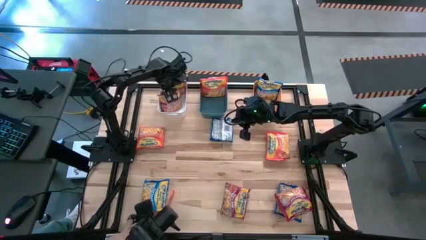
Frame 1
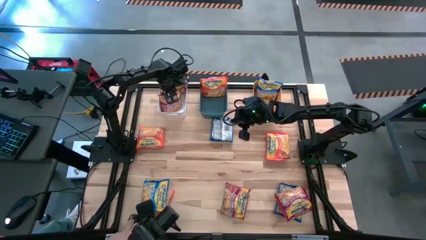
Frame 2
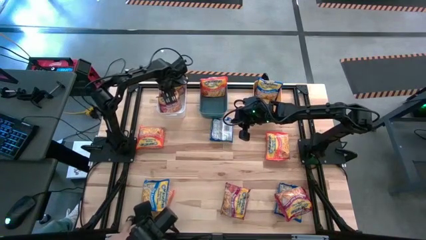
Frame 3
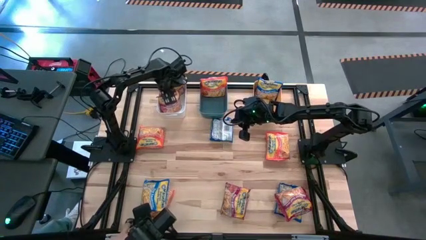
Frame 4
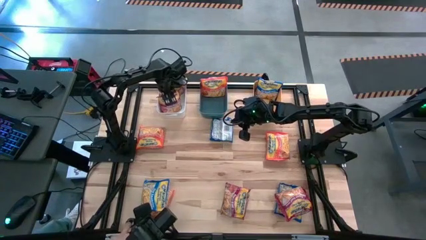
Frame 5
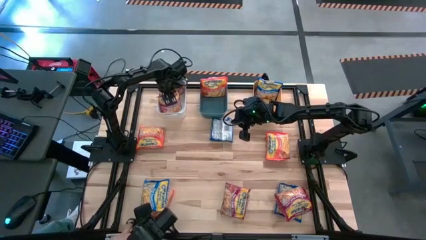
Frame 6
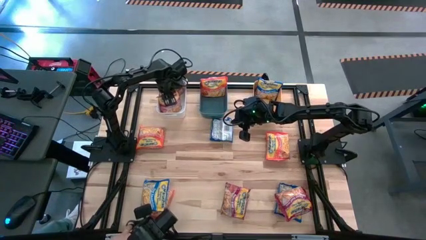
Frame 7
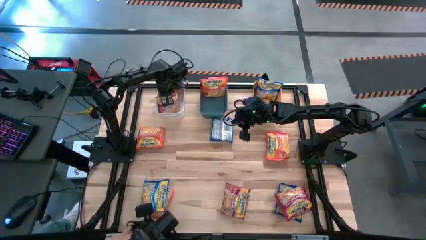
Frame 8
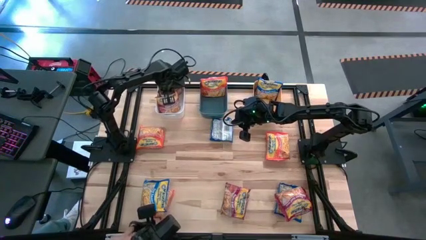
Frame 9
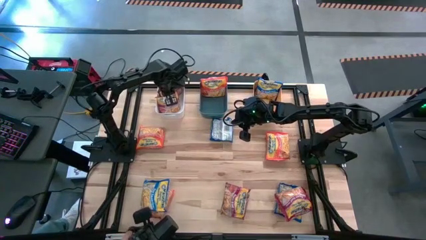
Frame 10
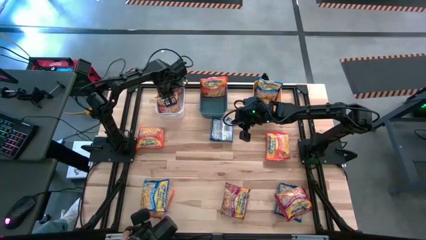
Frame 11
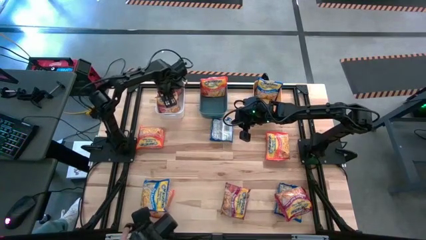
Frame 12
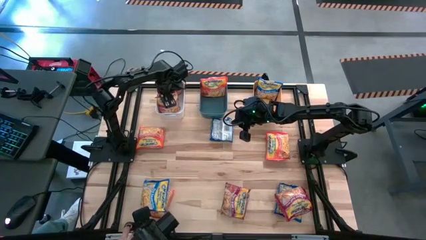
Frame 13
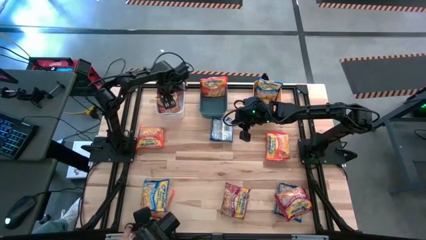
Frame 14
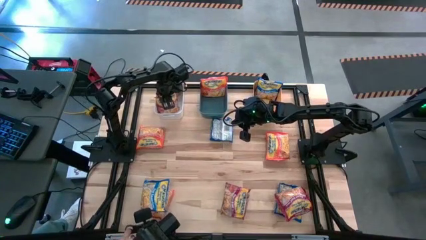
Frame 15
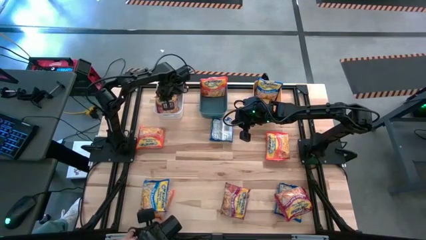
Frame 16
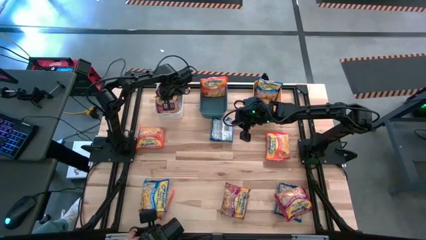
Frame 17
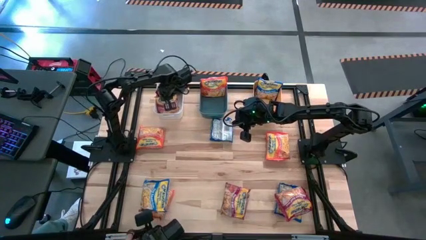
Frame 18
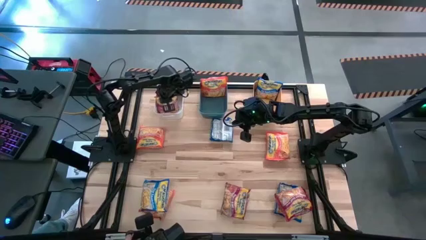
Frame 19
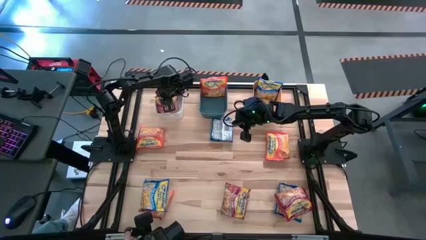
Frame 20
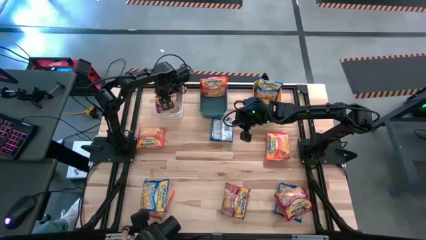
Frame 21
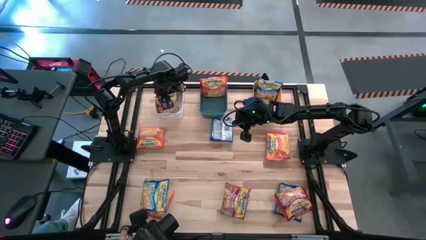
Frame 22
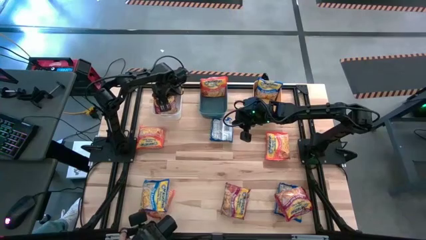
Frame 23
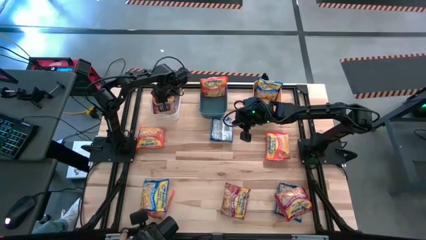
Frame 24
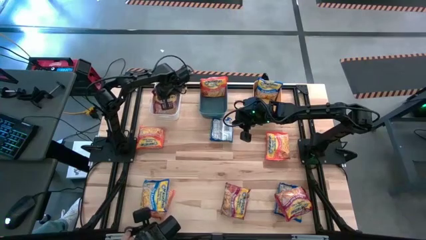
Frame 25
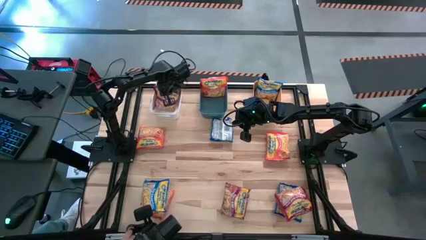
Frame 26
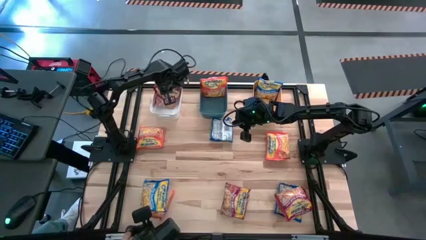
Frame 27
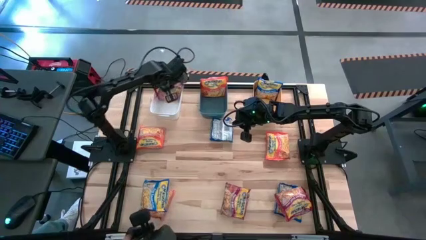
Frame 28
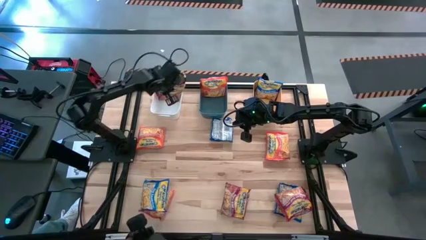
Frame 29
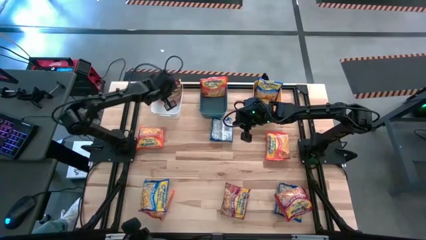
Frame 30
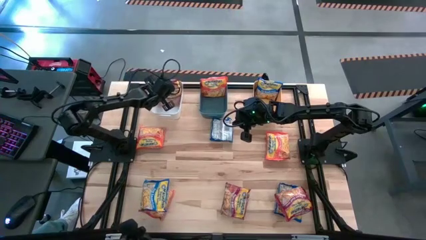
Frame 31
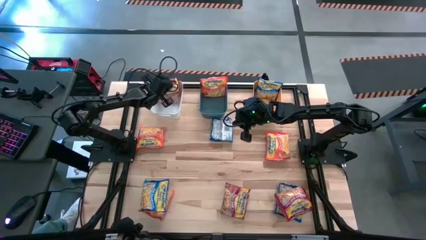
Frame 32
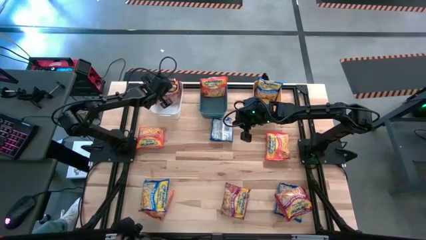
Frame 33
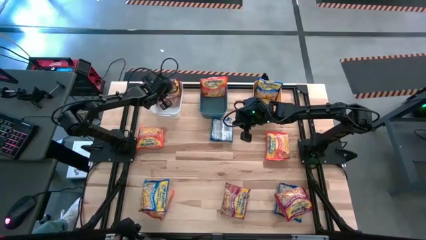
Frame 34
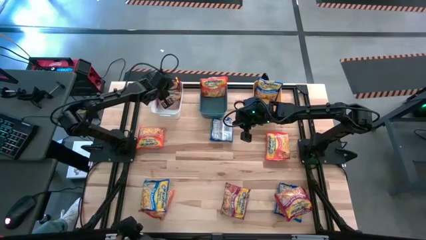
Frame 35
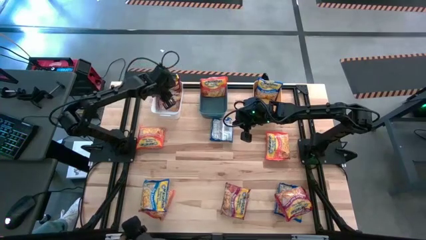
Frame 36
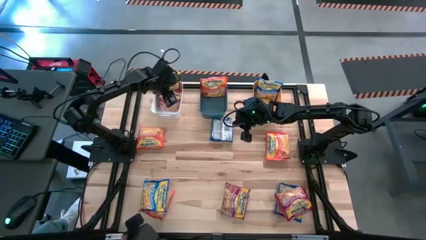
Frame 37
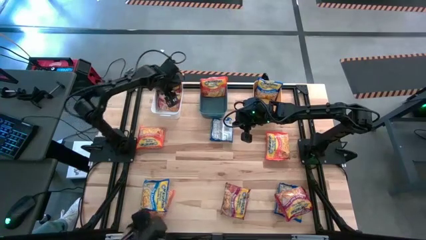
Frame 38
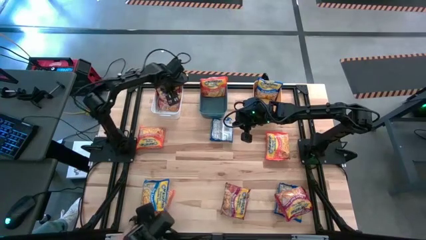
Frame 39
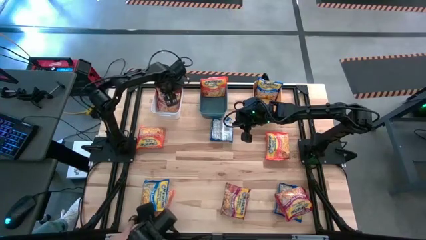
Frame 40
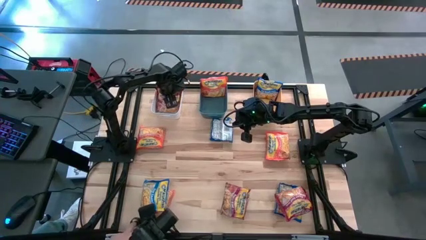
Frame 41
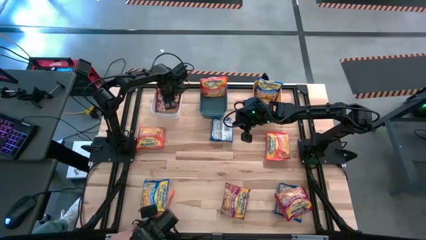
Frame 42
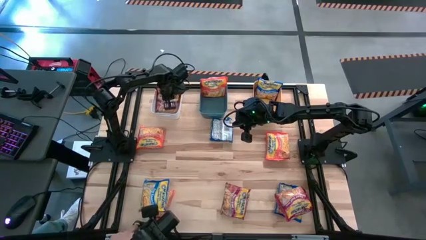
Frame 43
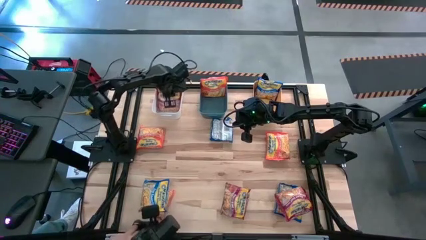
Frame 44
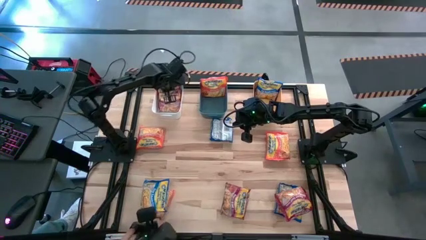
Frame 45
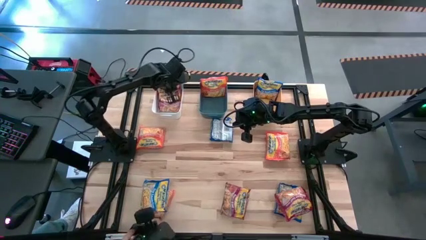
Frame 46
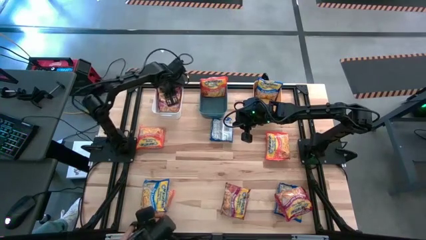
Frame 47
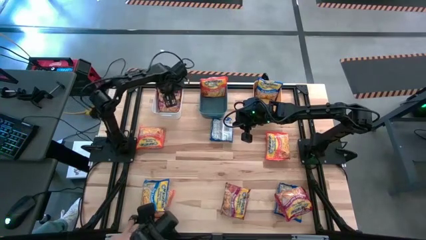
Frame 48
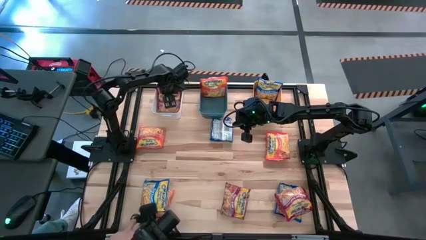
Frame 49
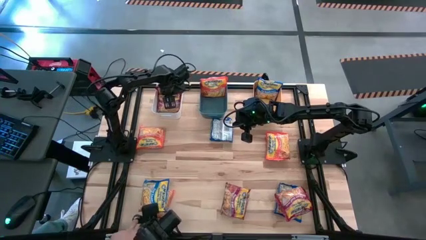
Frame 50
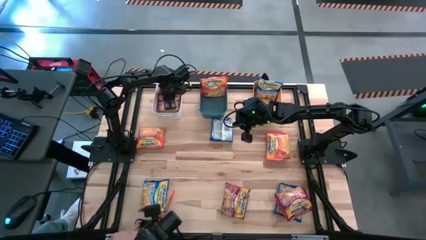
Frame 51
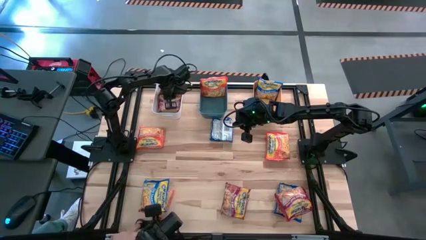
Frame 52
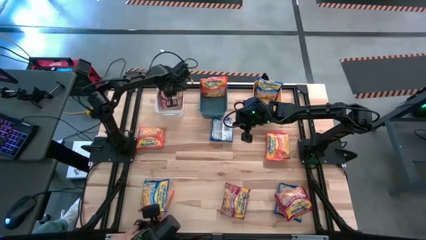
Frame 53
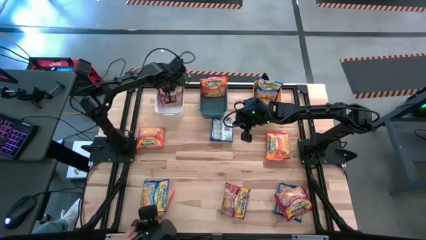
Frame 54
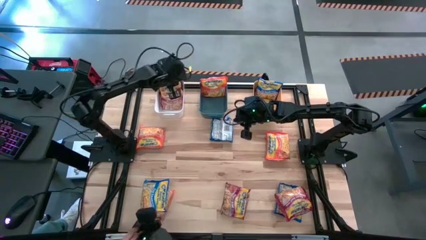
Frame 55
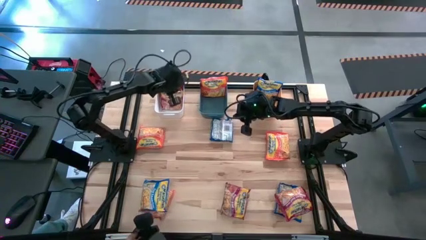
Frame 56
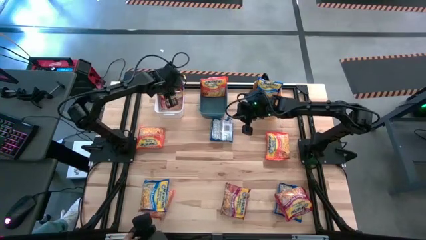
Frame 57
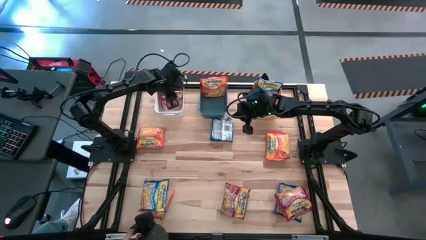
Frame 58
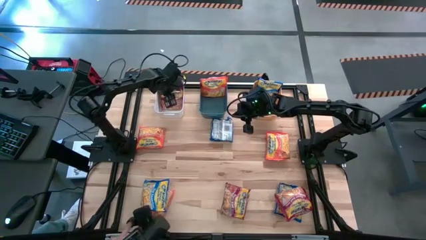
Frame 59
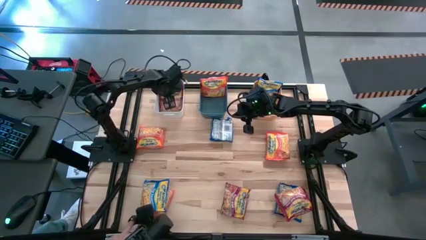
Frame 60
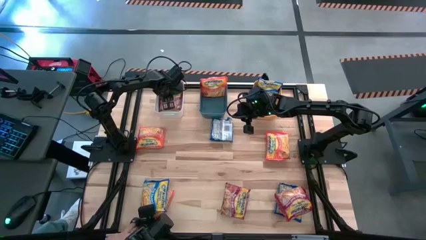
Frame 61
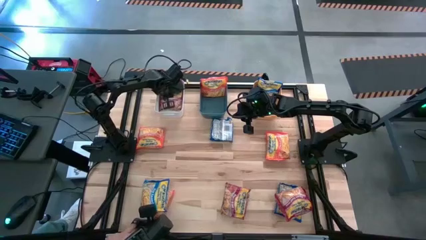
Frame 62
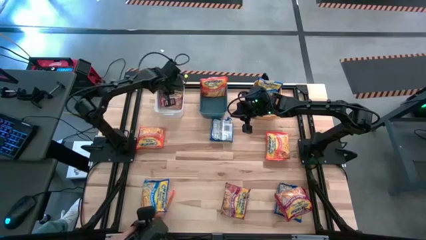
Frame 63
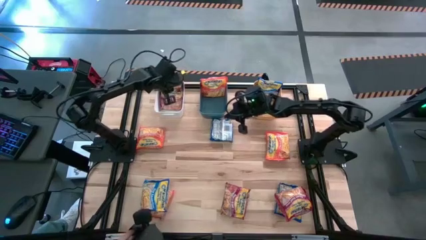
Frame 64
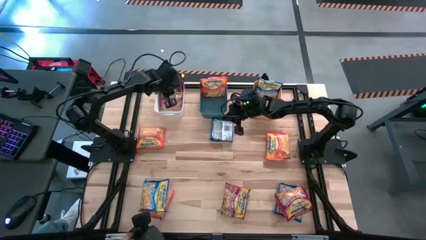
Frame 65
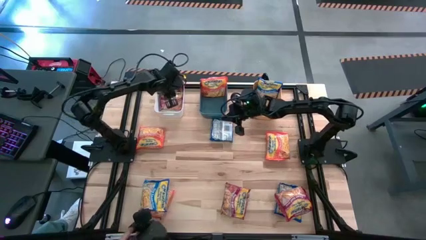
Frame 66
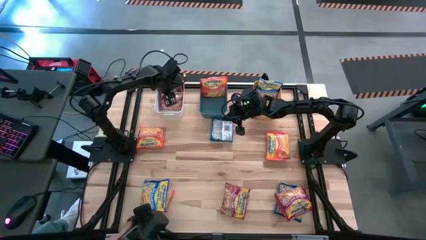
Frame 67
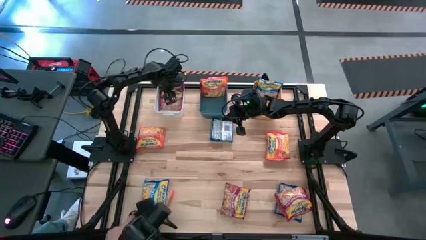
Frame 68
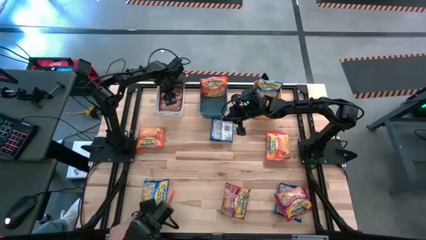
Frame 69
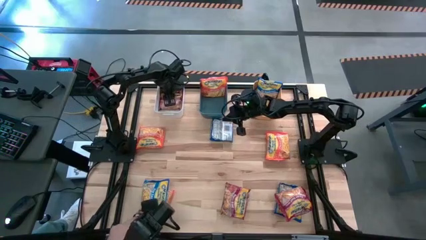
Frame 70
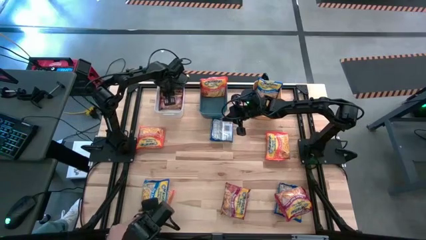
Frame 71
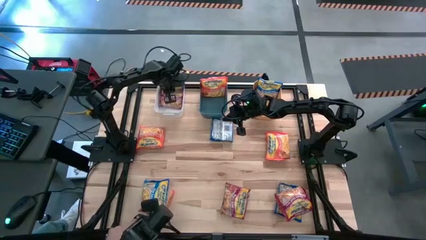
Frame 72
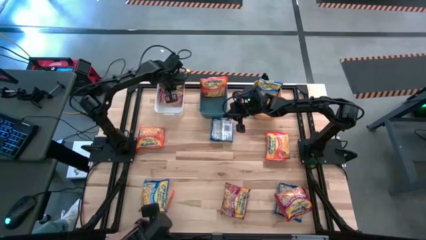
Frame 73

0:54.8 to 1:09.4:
Task: Sort Maruchan noodles
Put the red noodle pack into the white bin

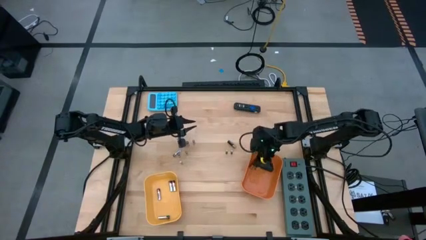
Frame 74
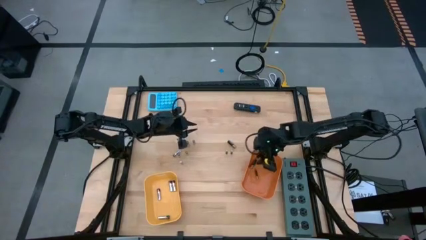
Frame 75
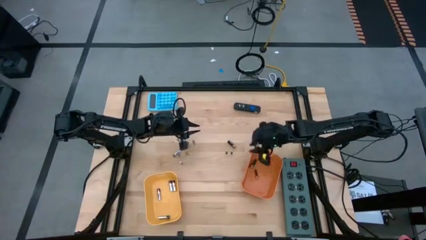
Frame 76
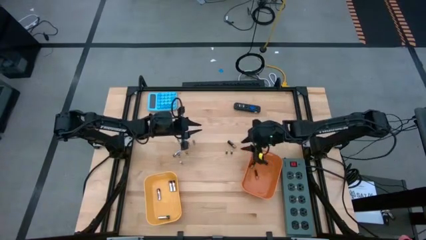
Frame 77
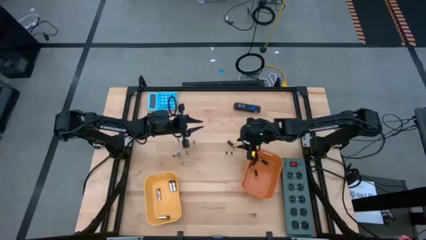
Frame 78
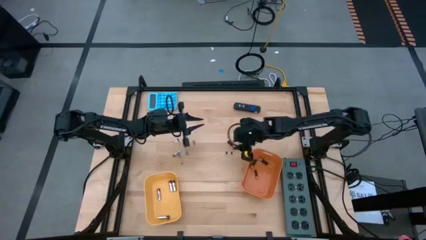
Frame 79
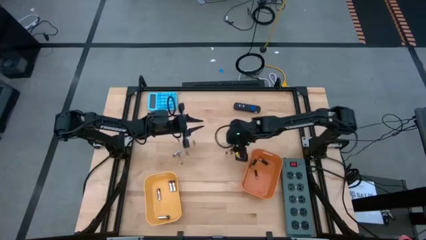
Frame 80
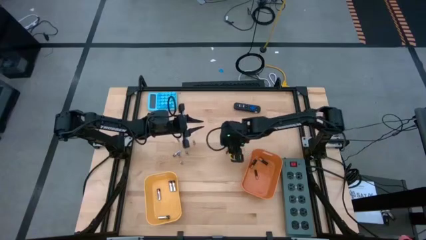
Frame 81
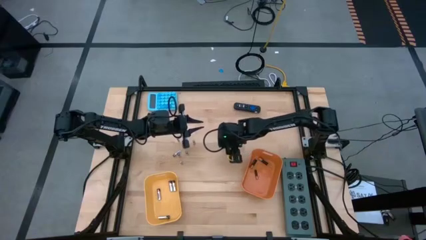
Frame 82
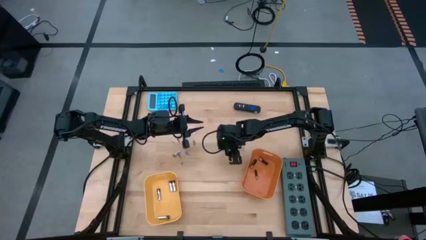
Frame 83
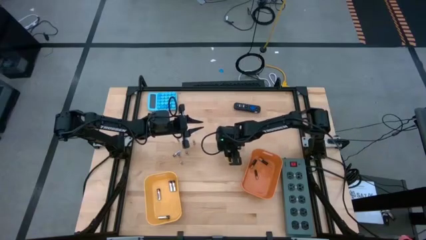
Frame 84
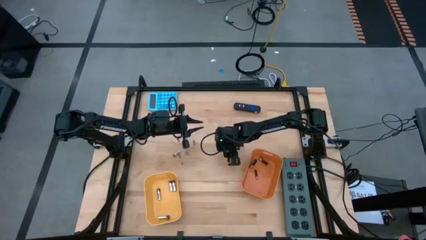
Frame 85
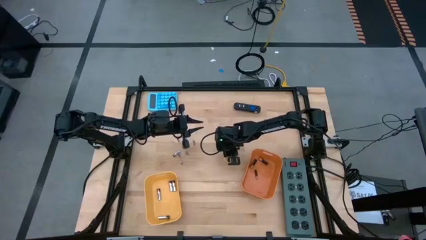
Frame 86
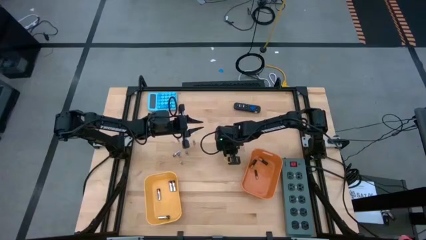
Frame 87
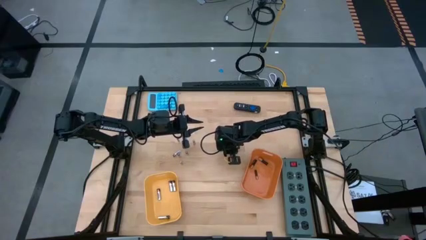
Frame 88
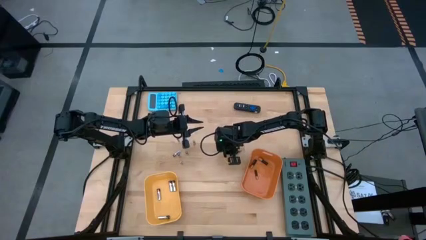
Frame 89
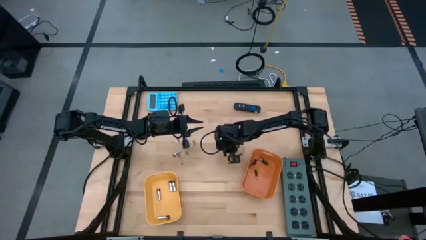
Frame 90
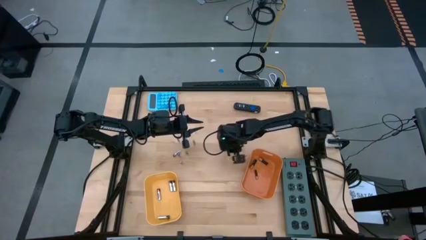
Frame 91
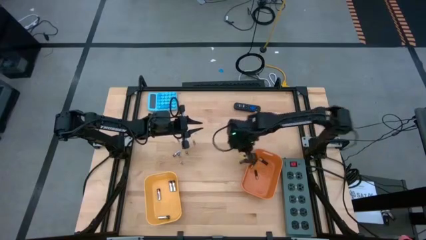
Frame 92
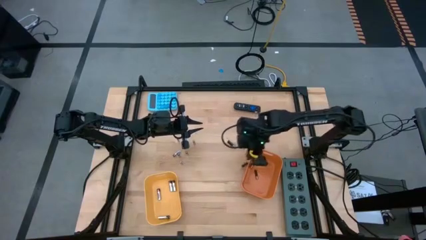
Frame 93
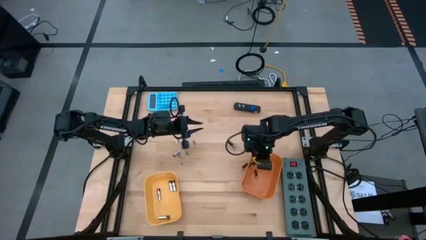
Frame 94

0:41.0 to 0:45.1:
Task: Sort batteries
Put the brown battery into the orange bin
